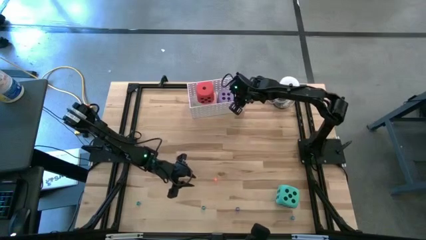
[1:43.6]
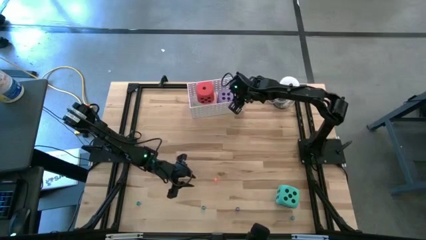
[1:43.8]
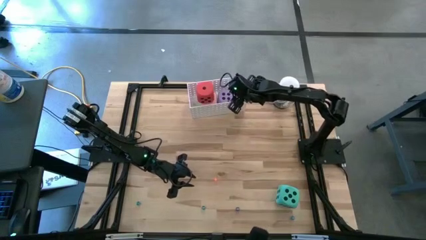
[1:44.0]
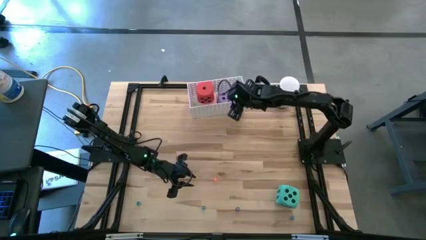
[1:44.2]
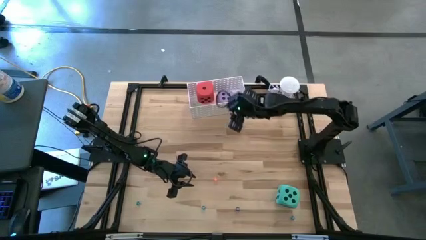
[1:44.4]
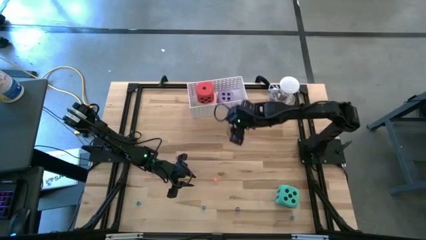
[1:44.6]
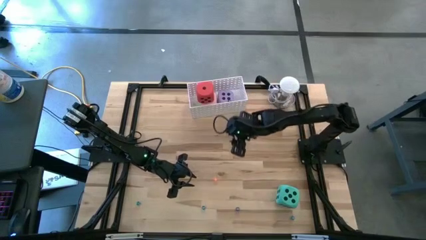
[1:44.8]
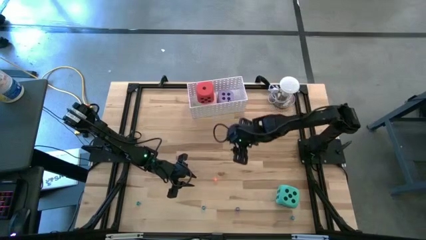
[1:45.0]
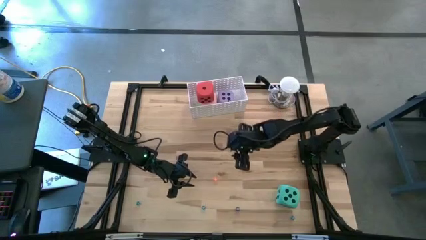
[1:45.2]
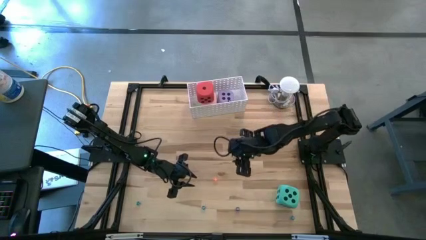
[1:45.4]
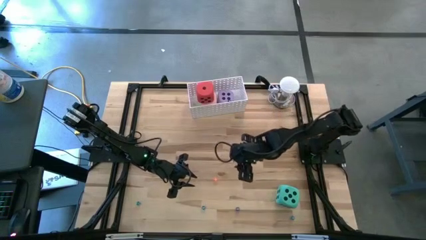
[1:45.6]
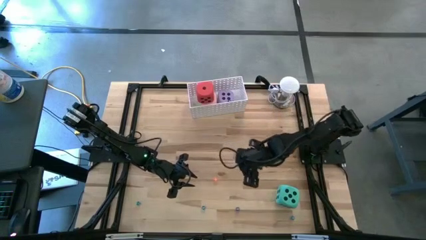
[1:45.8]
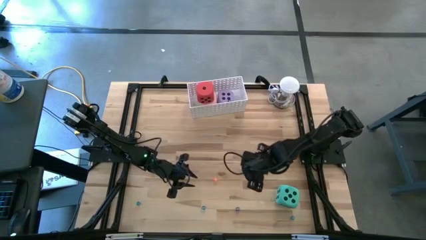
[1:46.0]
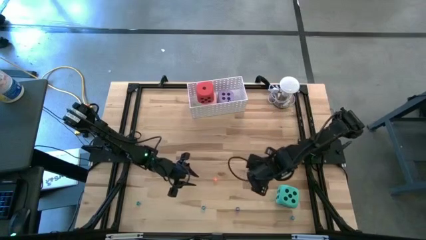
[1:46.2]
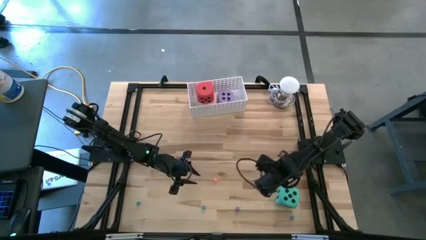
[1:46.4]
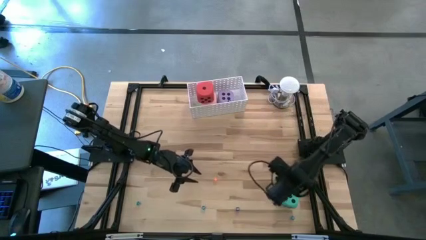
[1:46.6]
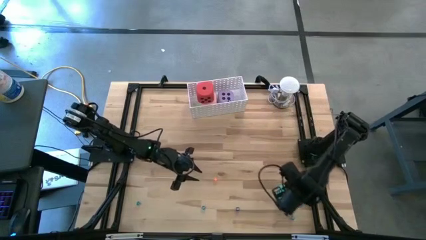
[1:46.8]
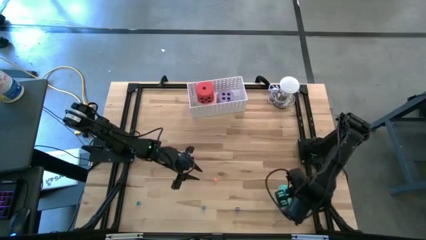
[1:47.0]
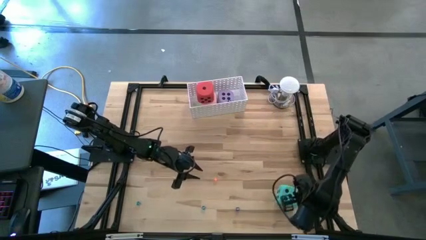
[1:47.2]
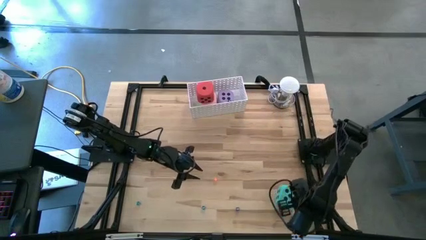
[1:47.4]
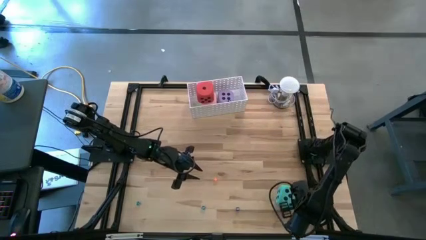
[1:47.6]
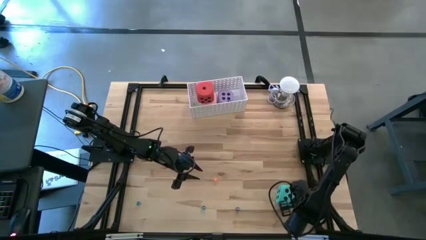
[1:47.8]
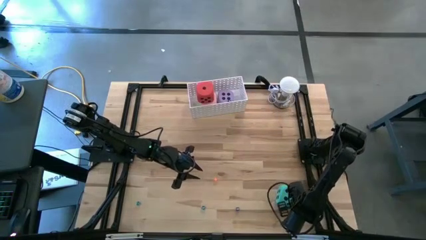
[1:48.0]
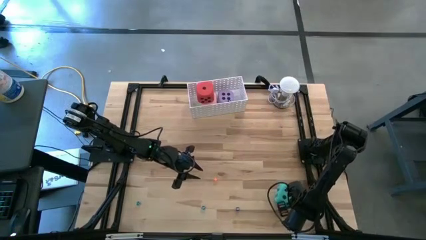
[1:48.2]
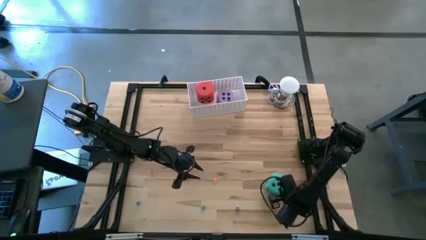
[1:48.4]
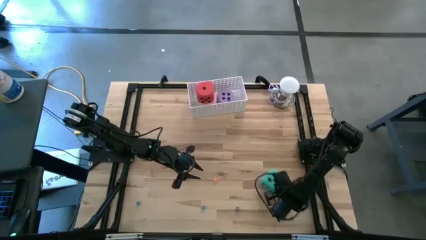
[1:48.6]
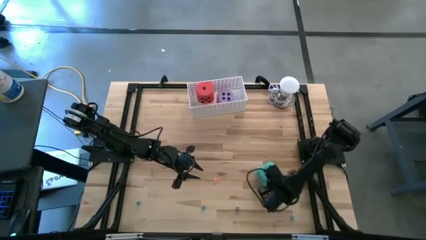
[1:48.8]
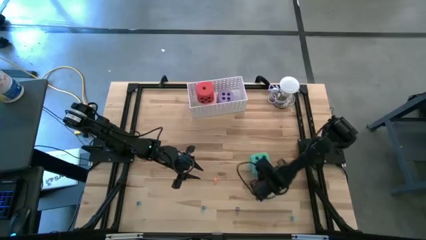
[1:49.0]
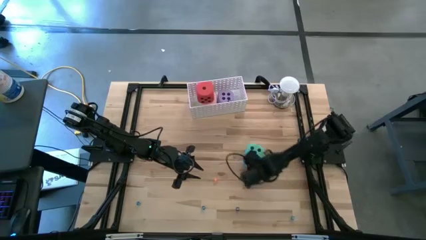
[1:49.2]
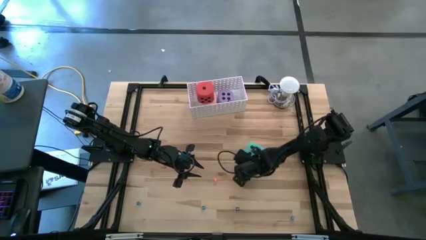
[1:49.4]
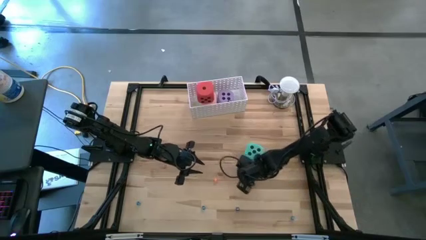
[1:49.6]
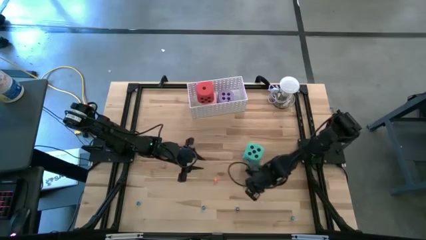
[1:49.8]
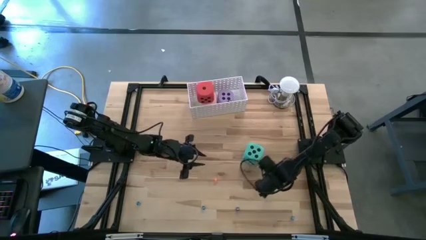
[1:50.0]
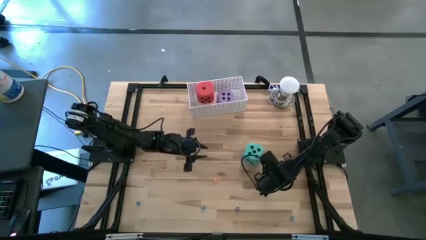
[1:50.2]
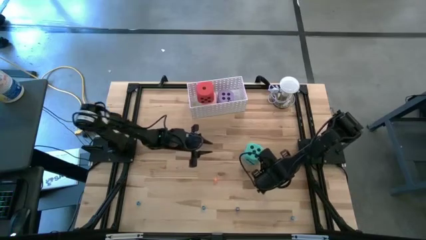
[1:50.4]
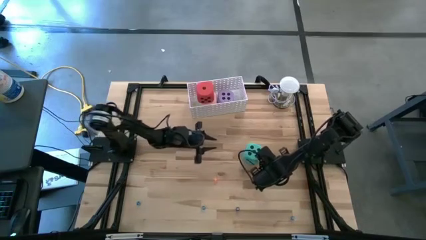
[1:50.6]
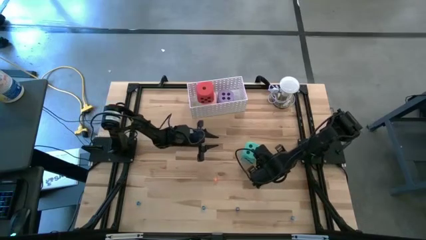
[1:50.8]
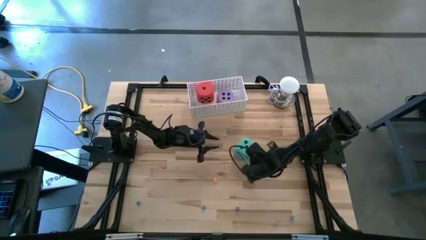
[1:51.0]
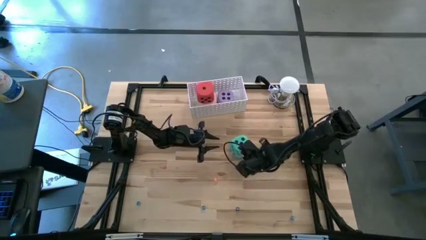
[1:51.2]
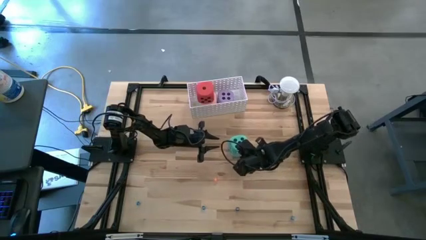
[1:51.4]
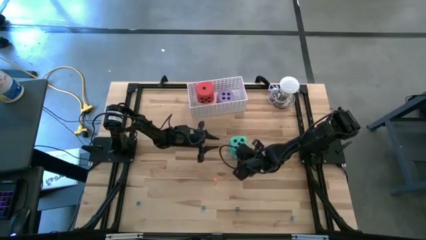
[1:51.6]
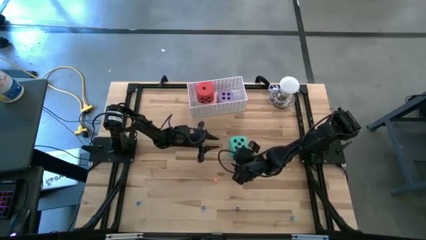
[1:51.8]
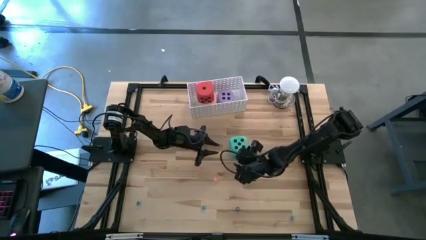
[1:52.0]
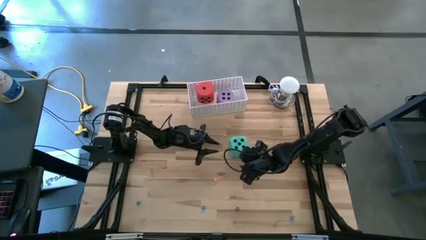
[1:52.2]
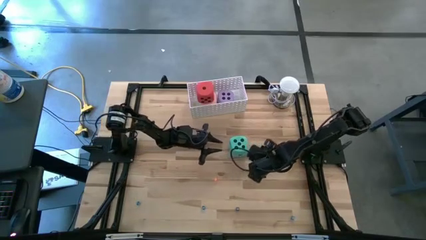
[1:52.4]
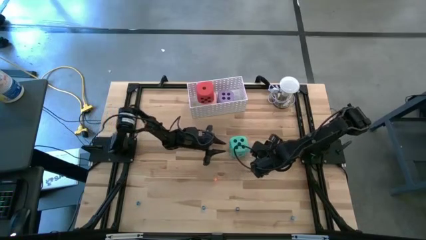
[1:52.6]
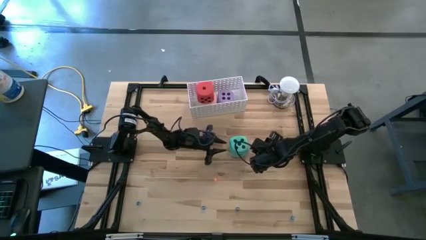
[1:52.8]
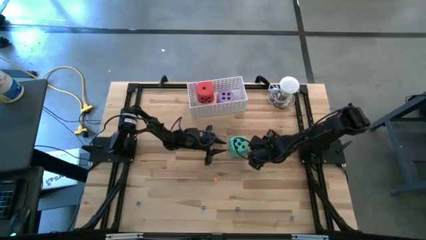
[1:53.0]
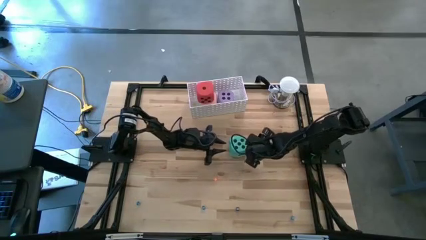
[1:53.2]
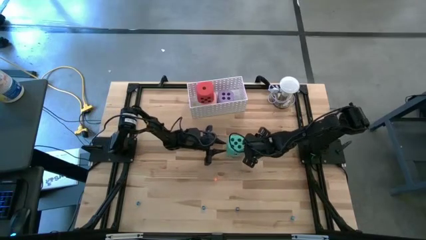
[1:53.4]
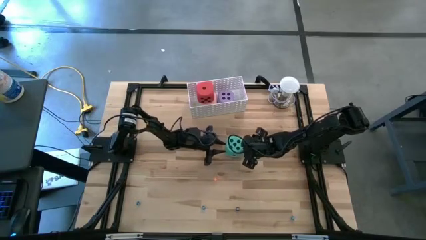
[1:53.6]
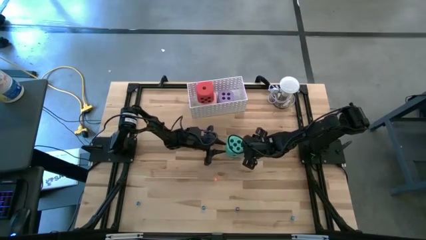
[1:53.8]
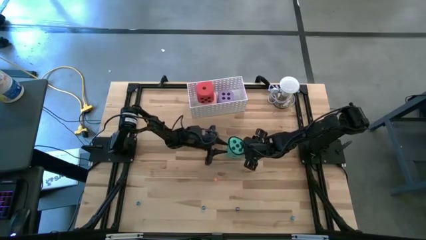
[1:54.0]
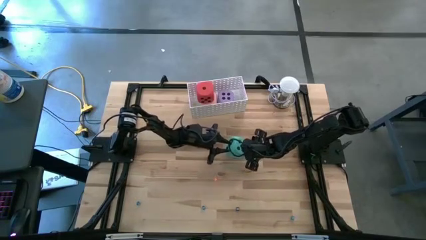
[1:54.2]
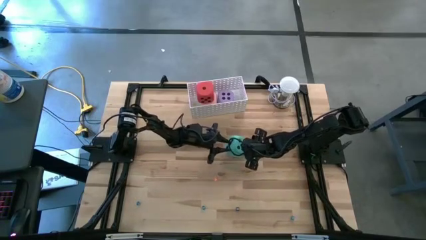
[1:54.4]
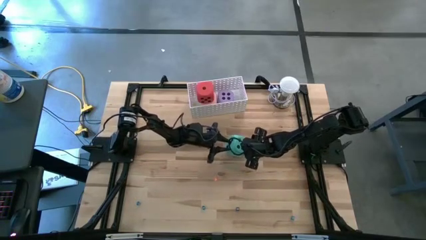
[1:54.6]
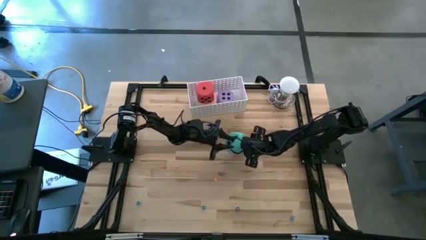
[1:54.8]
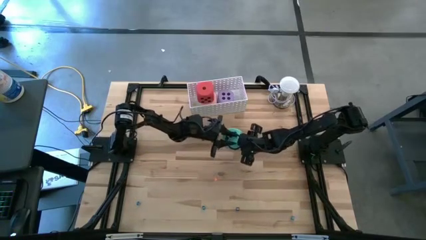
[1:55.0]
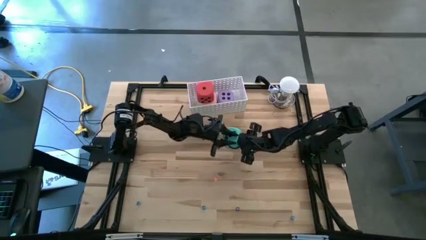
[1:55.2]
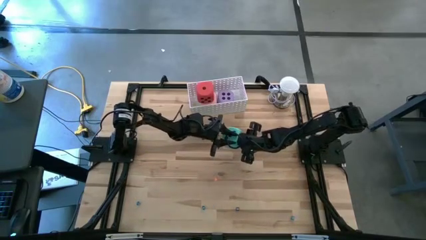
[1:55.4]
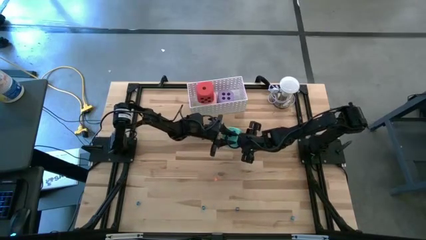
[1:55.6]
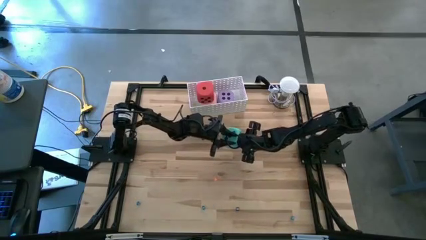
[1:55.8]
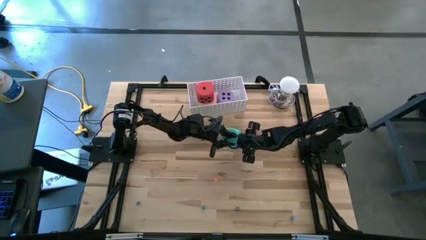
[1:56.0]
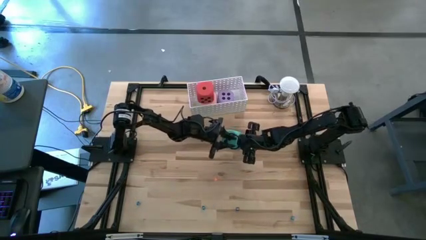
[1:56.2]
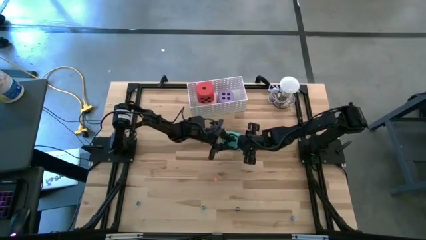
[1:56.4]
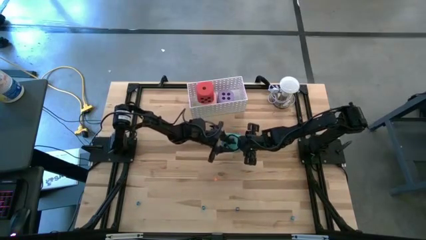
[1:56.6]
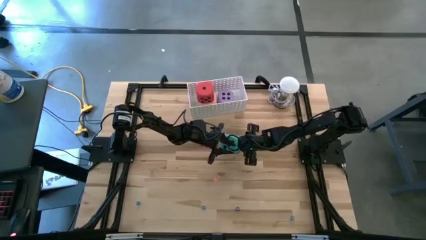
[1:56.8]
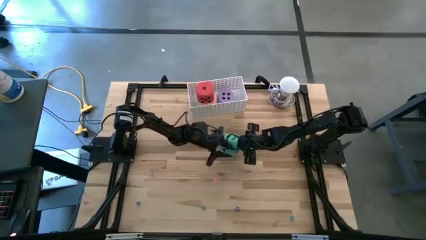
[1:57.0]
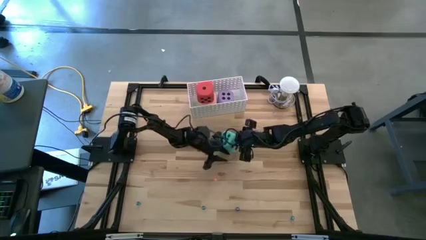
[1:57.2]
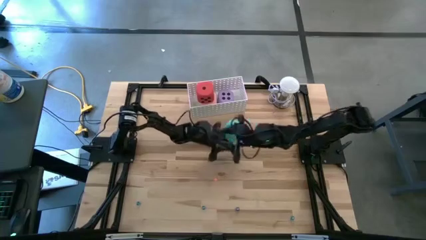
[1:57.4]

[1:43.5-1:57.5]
Task: Pick & Place Dice
Put the large blue dice into the white bin

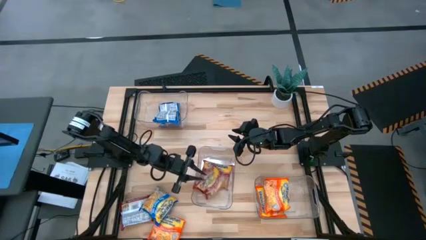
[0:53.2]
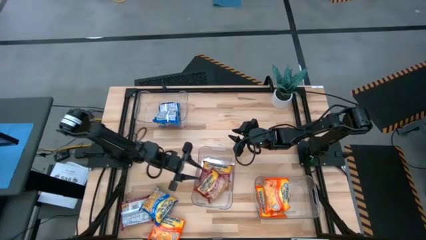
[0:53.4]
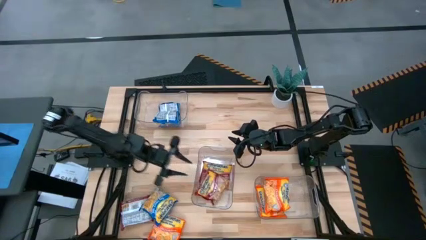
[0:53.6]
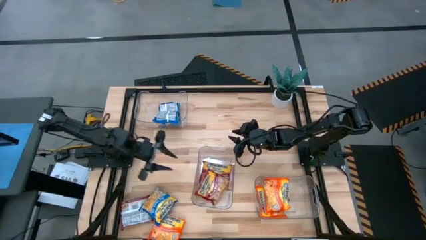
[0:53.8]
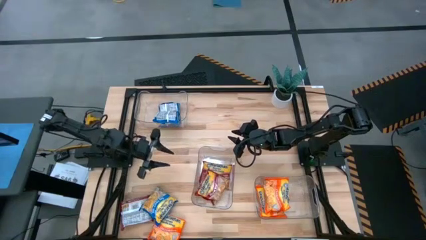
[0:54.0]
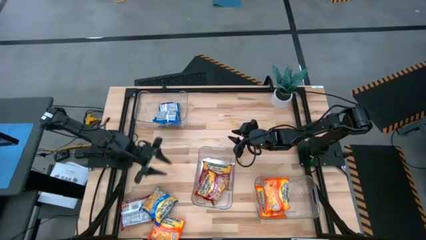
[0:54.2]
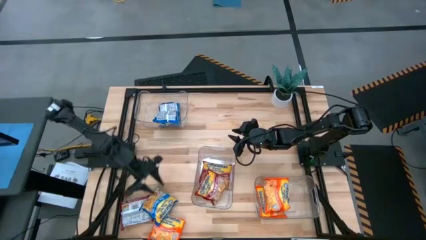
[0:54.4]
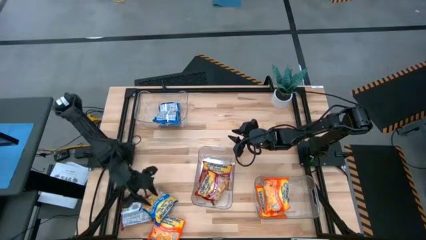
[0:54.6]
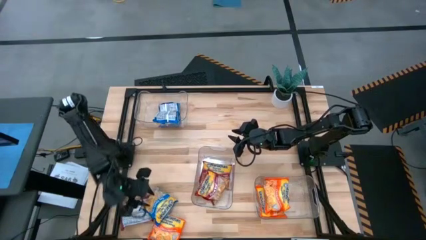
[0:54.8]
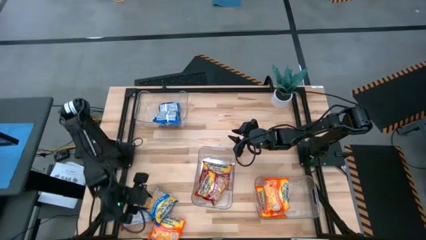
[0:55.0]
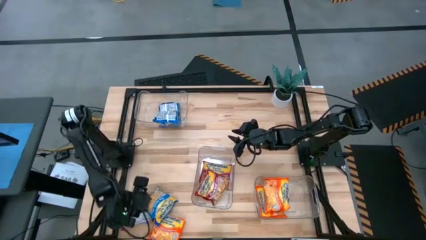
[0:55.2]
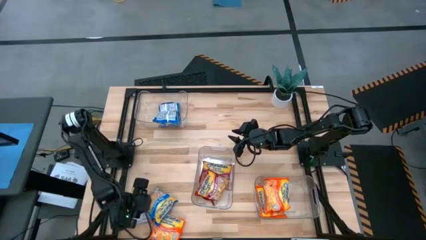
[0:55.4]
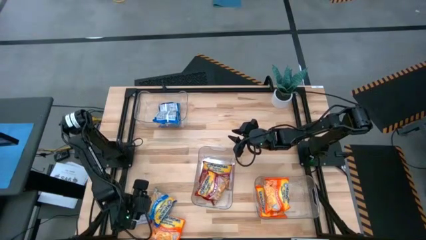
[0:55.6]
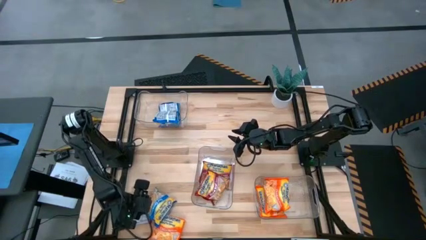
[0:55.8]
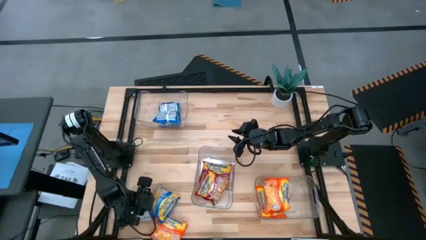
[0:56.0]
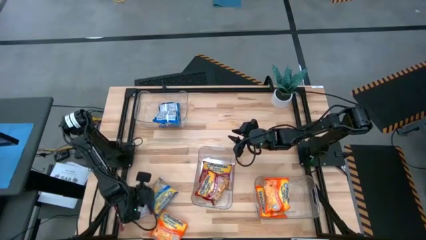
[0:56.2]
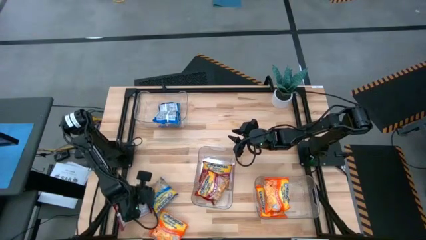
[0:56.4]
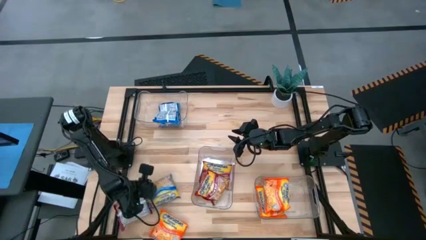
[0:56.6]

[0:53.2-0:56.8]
Task: Sort Maruchan noodles
Put the blue noodle pack into the top transparent bin
